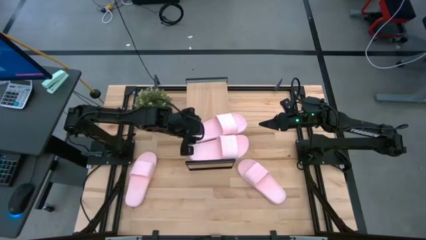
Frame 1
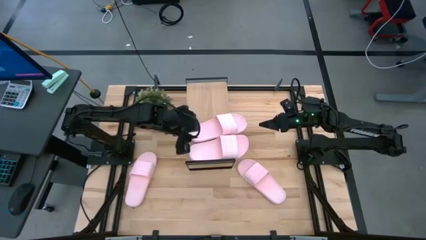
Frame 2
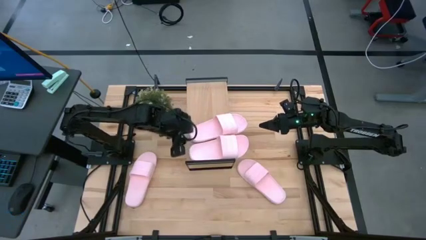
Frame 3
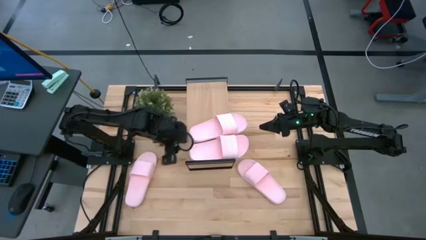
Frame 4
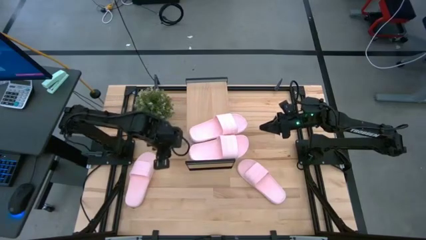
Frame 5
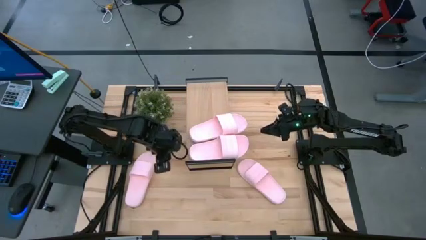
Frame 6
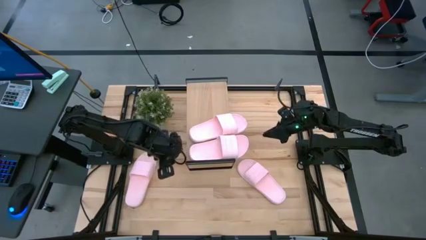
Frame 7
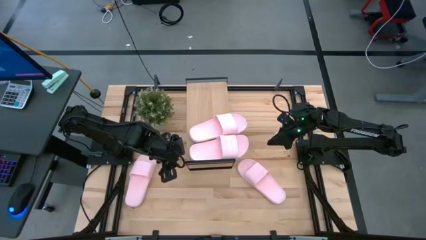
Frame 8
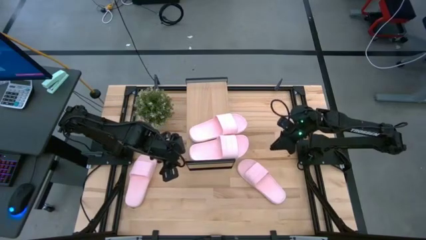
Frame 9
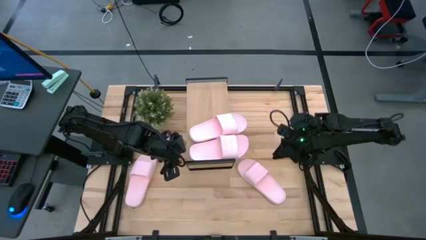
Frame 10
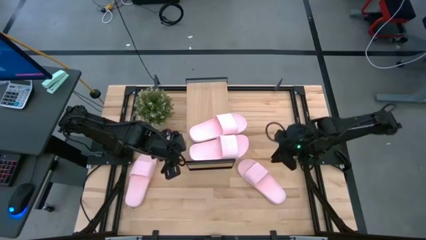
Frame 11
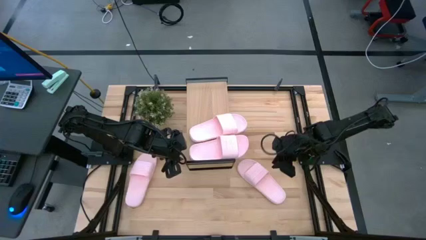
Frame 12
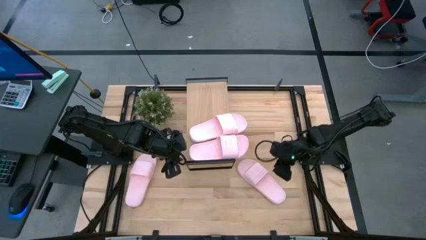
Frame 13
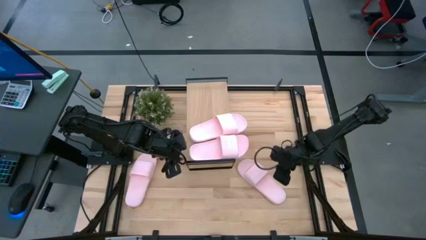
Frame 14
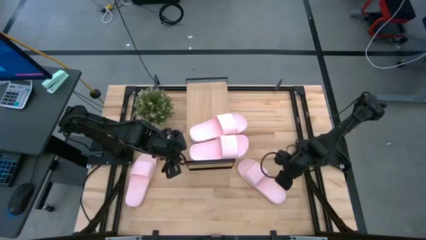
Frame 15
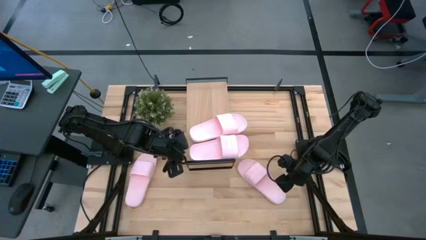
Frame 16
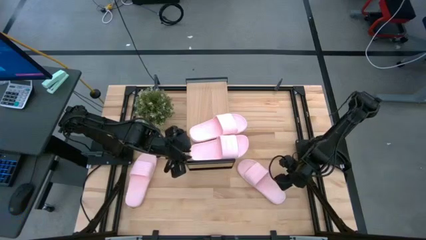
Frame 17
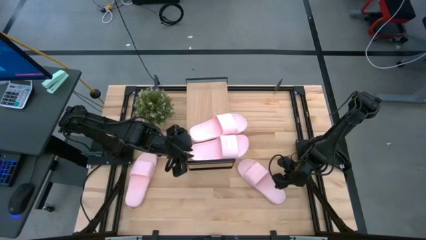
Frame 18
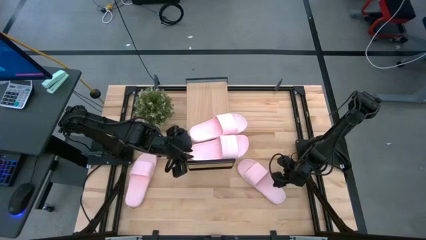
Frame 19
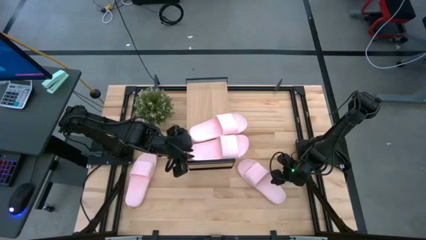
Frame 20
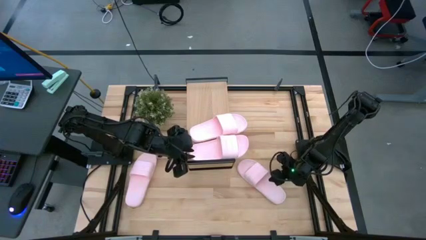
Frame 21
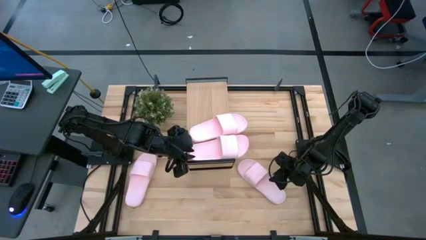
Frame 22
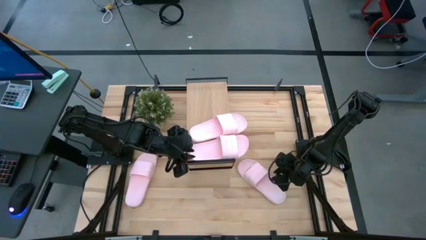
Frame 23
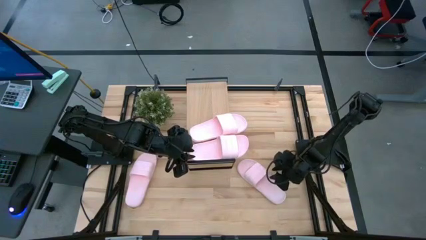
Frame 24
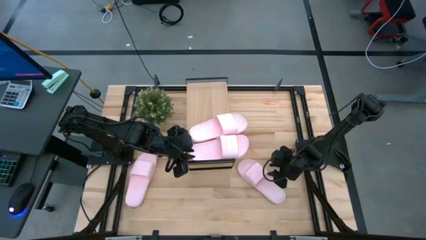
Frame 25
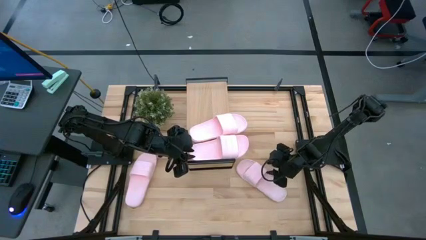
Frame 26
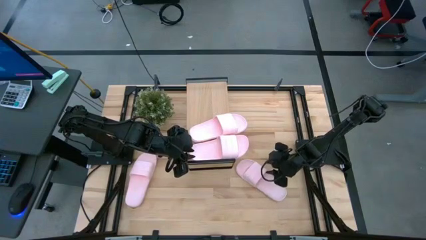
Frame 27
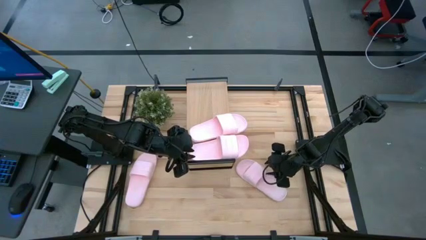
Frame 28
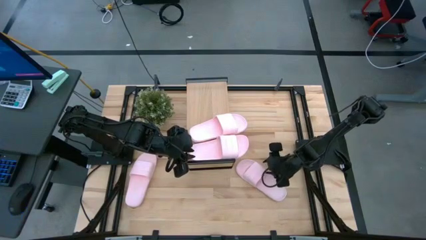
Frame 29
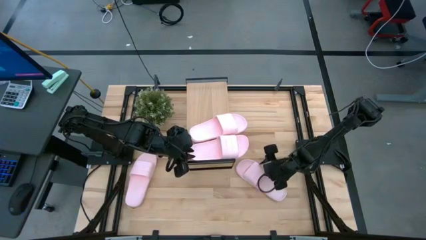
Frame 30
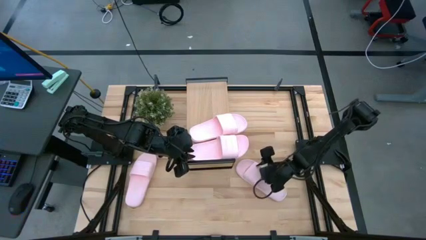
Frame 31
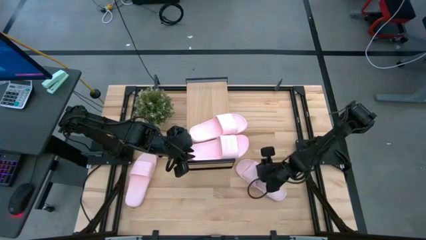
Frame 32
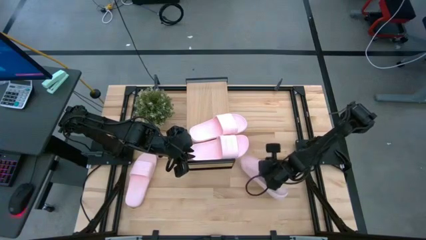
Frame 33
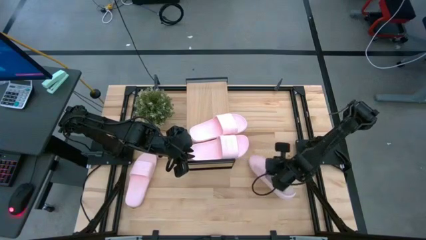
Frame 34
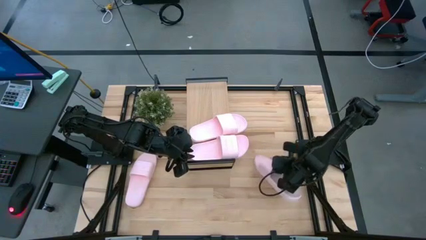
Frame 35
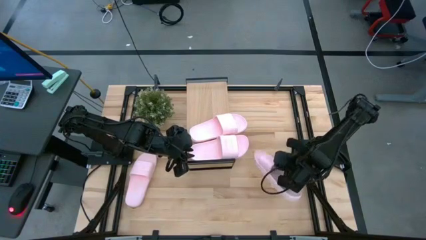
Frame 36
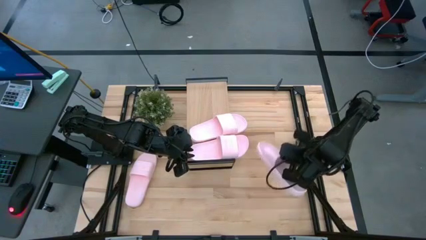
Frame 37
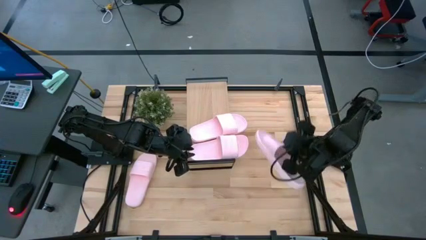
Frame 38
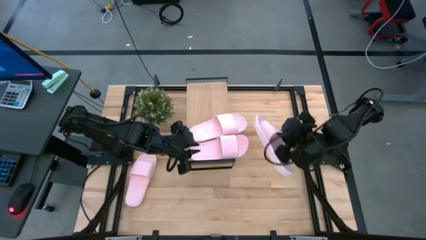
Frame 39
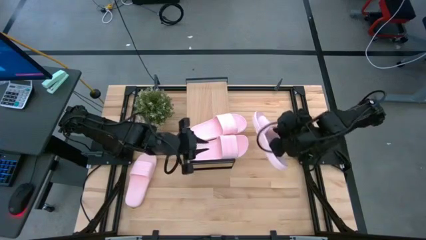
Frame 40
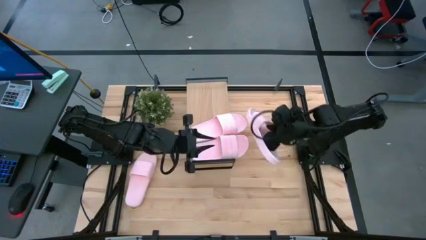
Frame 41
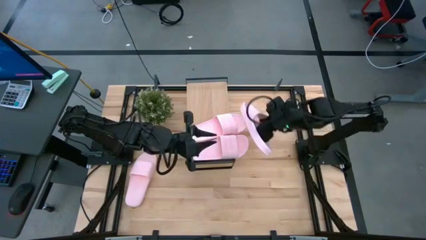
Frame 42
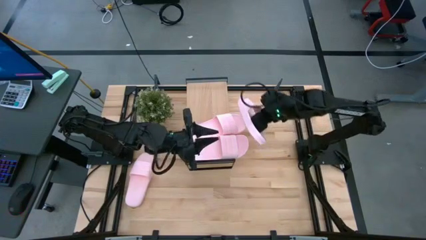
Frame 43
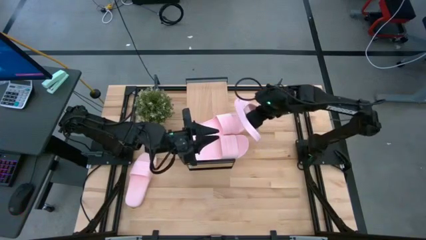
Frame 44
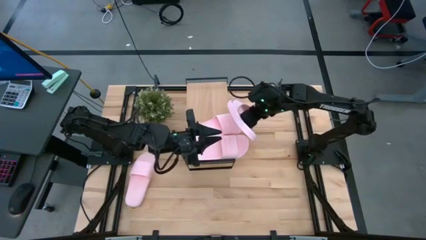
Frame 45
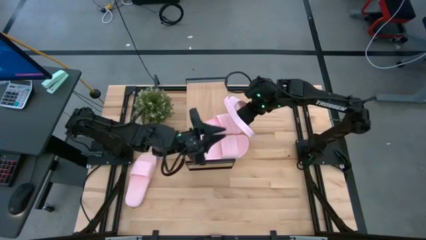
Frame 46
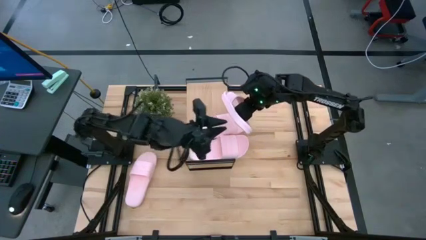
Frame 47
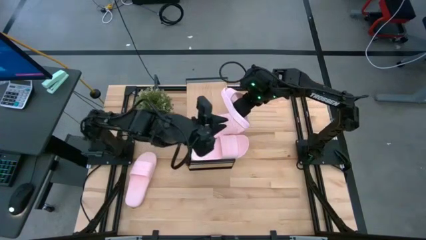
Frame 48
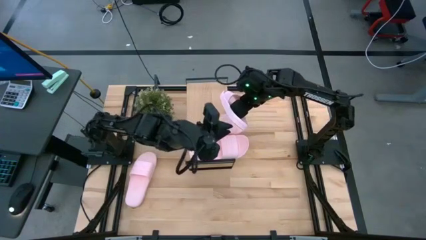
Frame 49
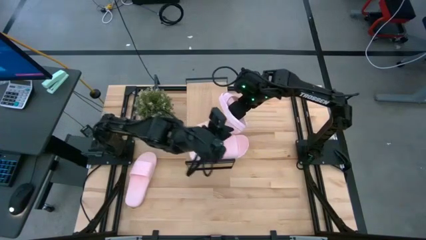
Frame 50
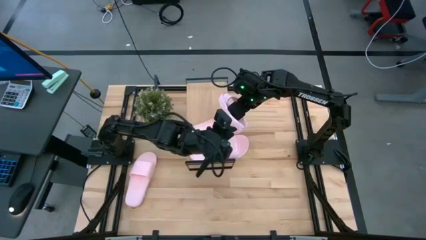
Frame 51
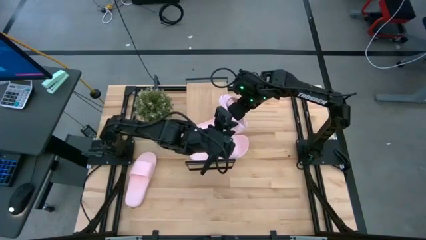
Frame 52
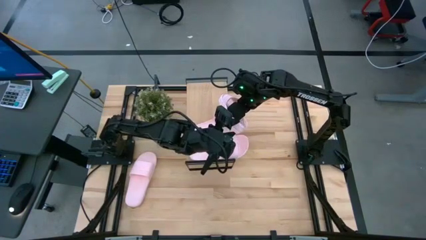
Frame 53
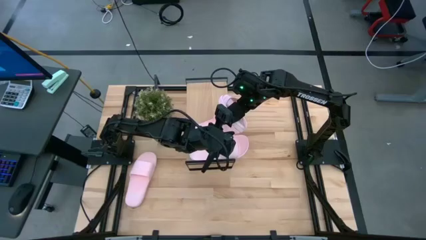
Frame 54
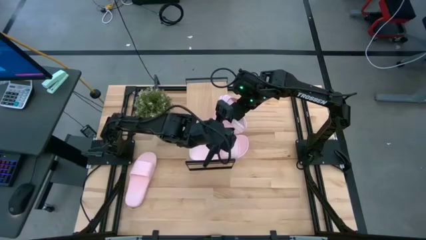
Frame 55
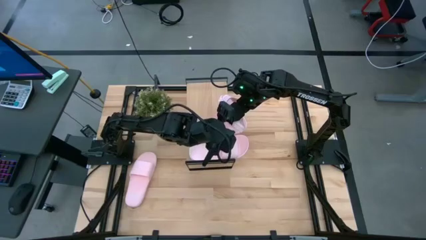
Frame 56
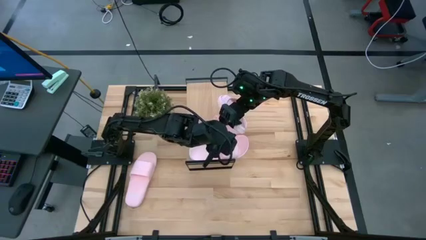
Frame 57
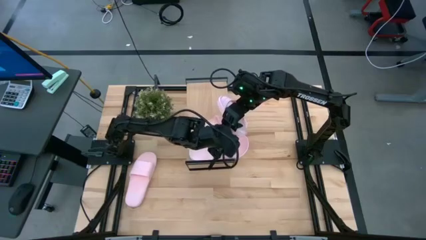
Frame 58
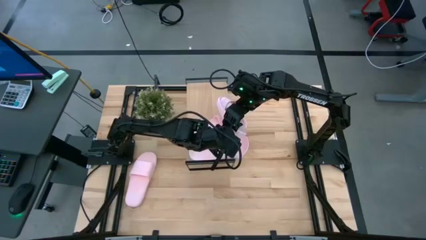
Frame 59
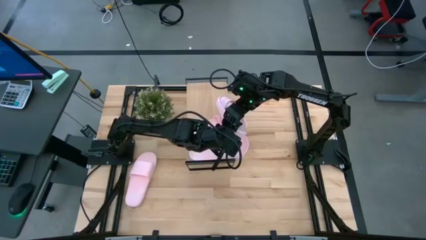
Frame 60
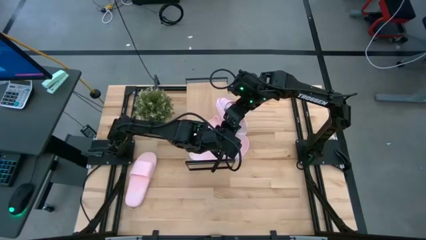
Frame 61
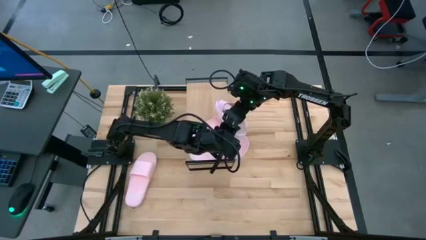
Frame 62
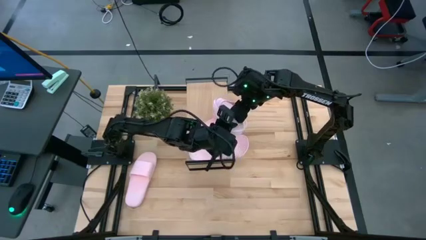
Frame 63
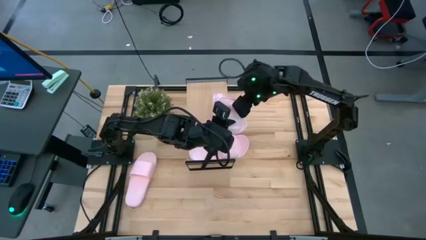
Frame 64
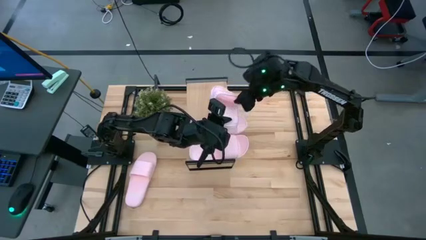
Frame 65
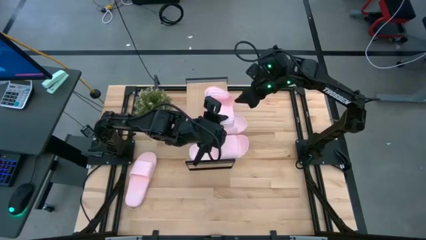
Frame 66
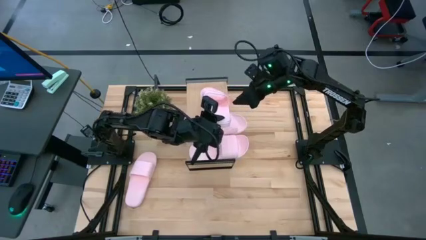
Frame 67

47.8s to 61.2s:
Task: Pick and place slides into the shelf
Put the pink slide on the shelf

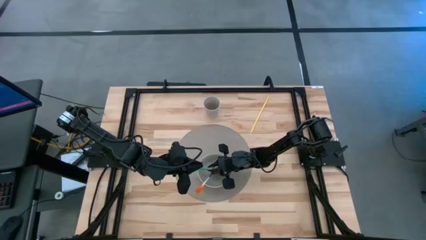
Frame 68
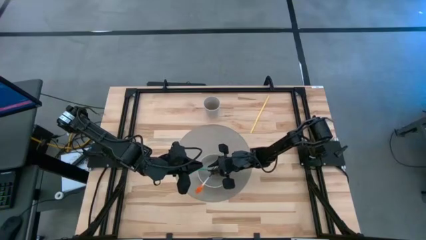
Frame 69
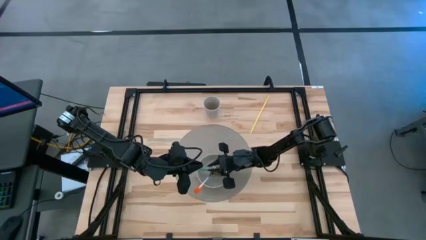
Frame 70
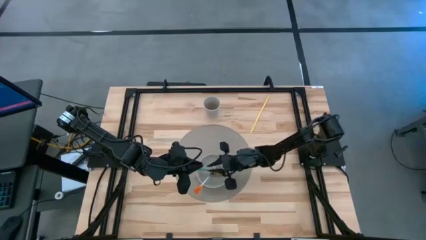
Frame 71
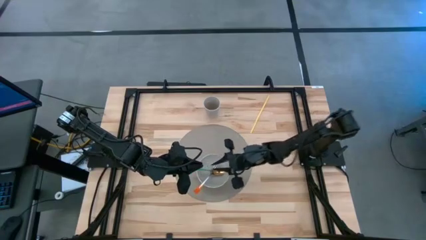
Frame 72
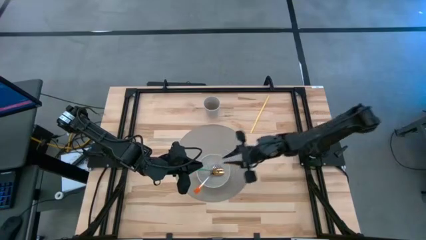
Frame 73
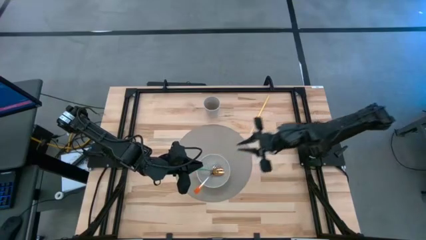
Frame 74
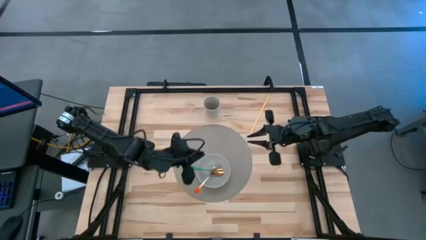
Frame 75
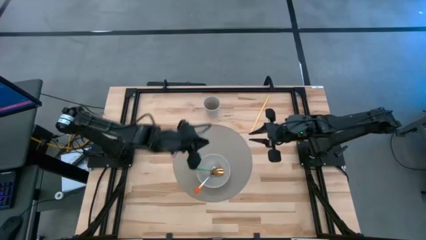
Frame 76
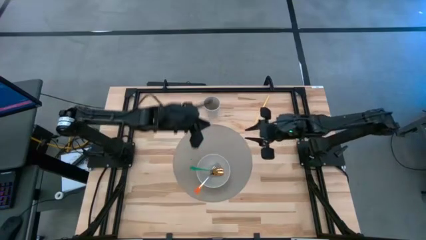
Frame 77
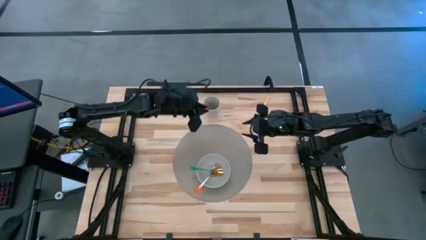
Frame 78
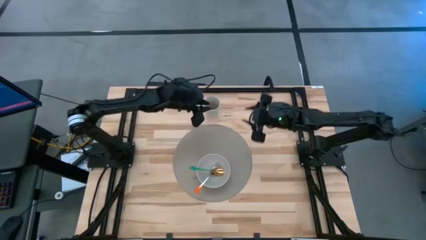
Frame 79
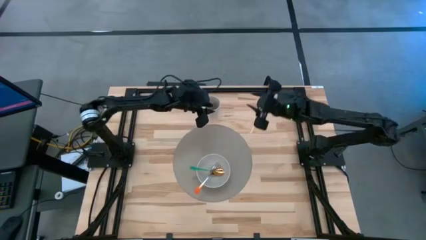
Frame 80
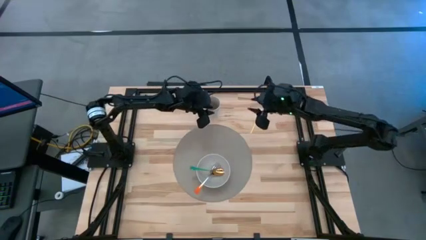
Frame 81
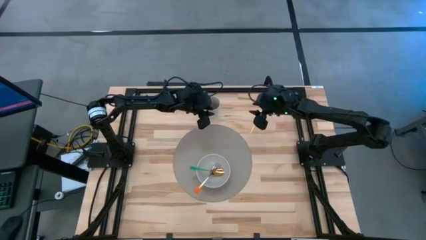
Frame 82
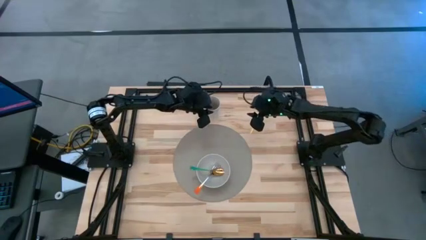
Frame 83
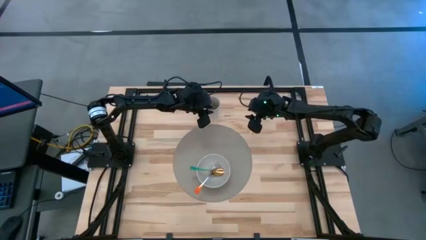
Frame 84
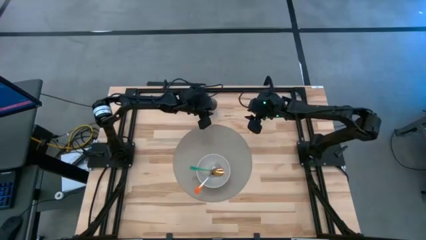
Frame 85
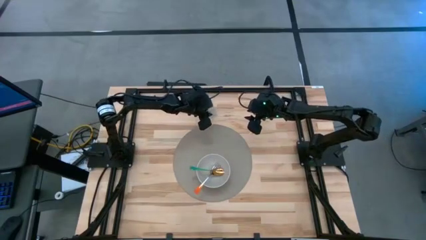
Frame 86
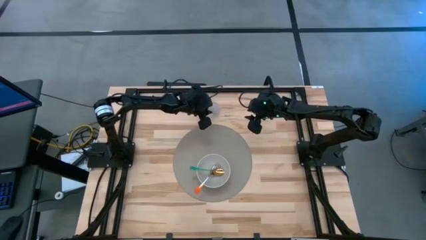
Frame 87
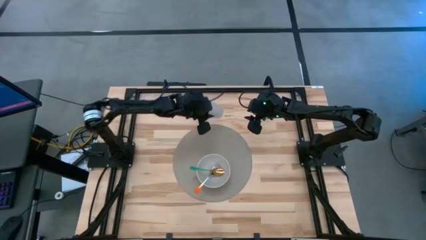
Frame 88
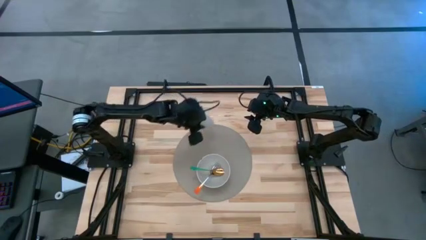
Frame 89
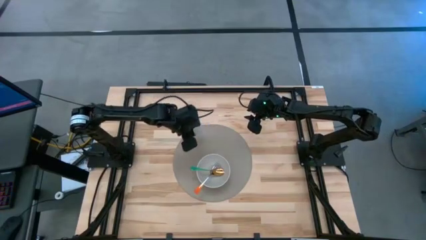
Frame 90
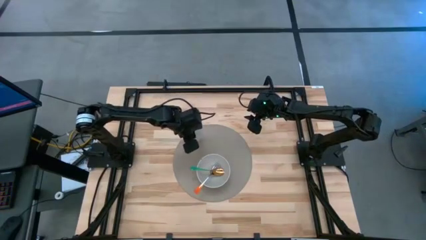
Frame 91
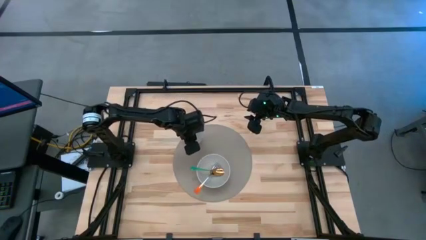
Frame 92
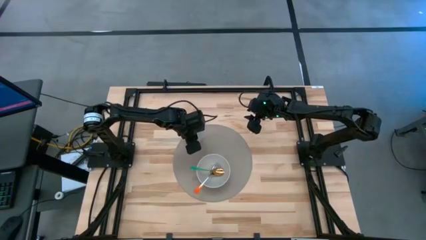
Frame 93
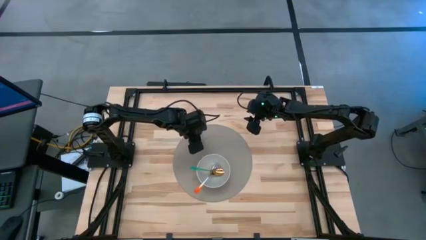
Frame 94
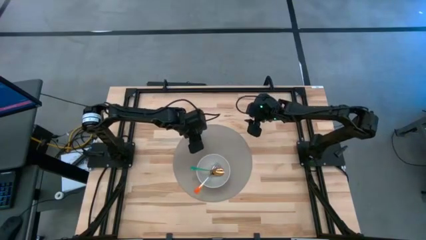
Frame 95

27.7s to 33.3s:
Task: Pick & Place Utensil
Put the gray cup on the gray placemat to the top left of the white bowl
